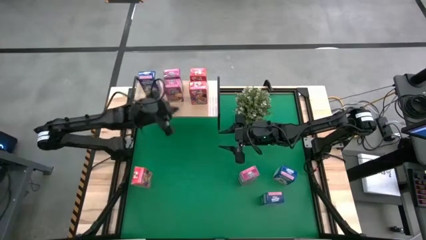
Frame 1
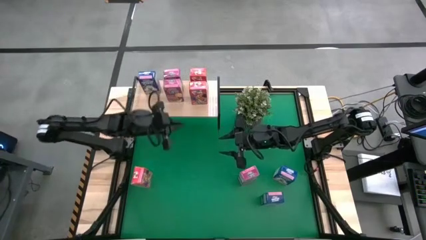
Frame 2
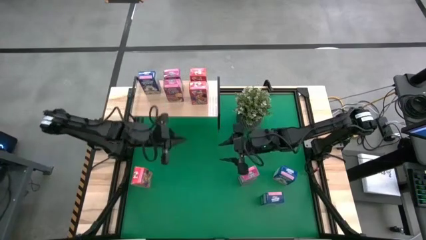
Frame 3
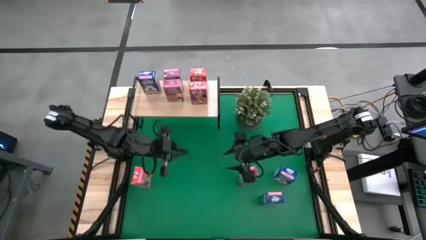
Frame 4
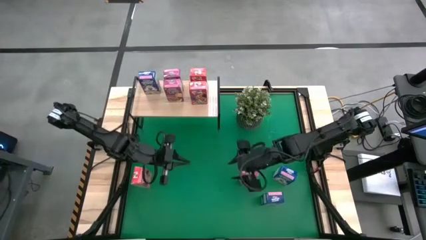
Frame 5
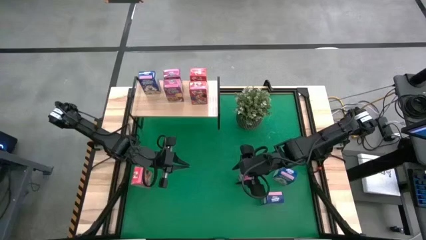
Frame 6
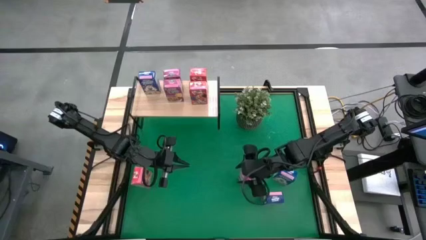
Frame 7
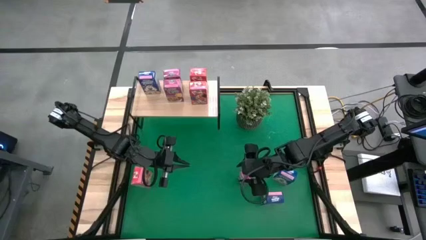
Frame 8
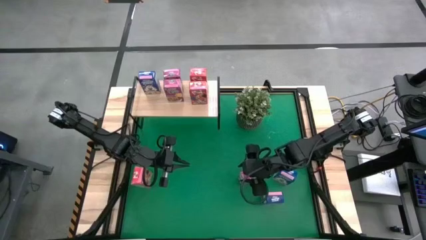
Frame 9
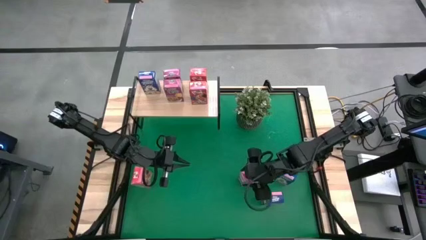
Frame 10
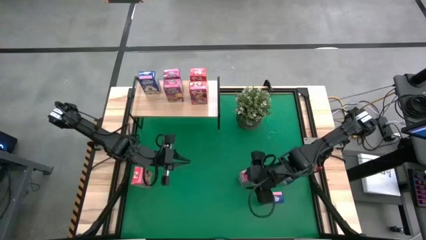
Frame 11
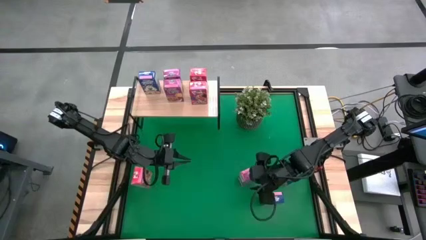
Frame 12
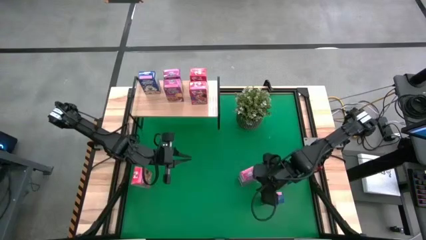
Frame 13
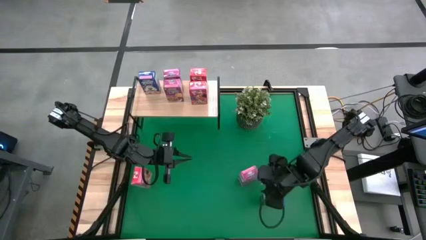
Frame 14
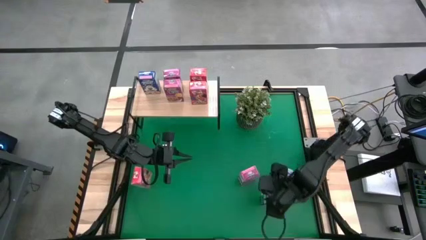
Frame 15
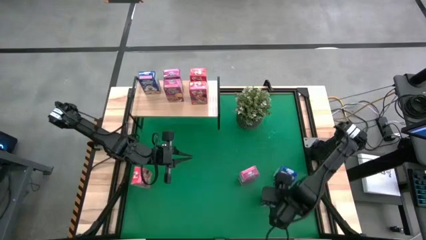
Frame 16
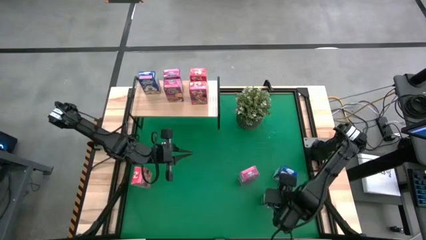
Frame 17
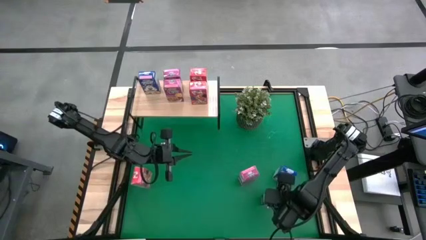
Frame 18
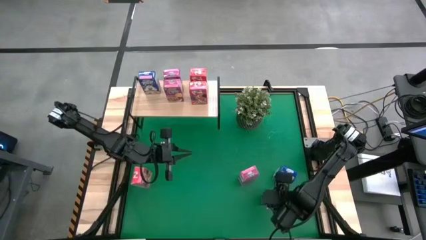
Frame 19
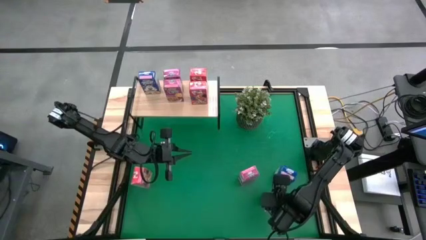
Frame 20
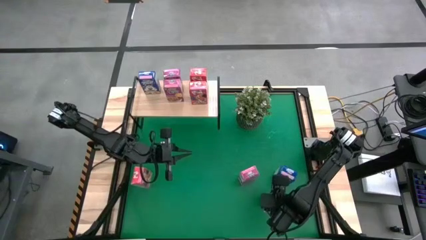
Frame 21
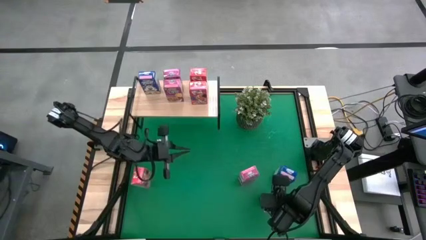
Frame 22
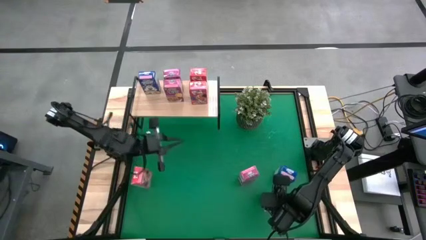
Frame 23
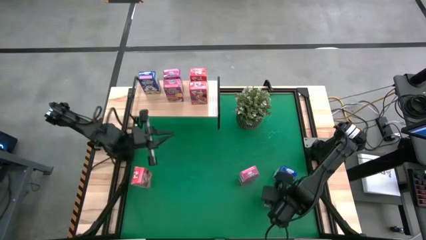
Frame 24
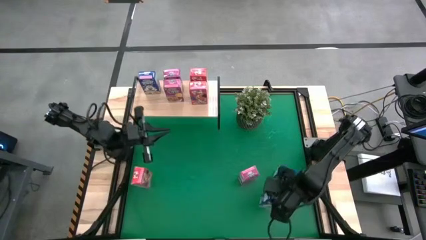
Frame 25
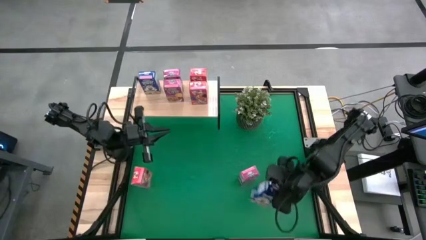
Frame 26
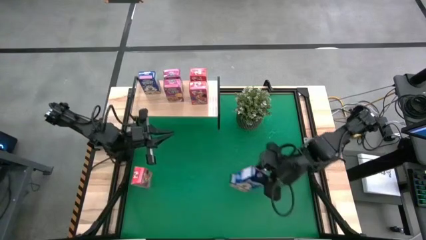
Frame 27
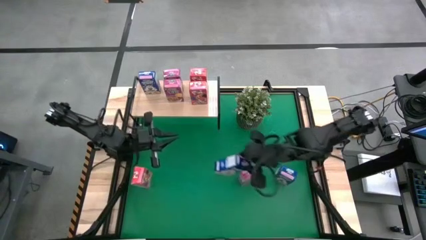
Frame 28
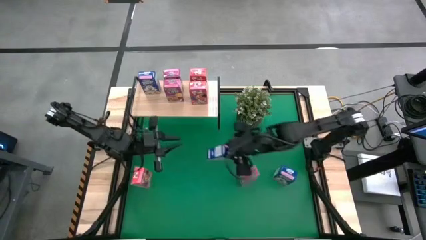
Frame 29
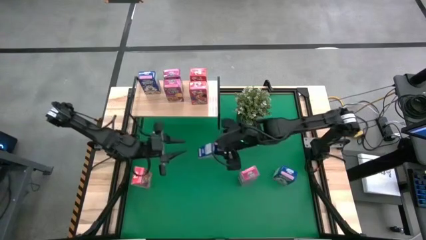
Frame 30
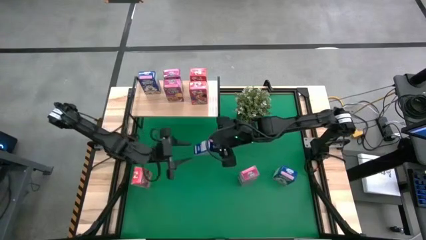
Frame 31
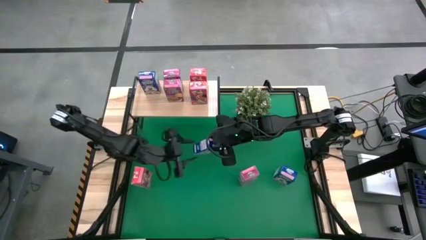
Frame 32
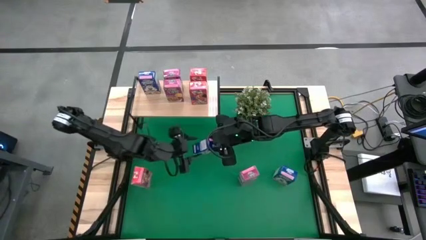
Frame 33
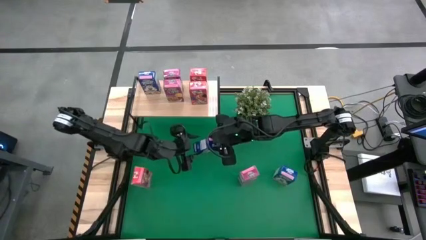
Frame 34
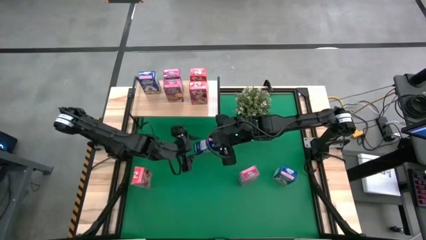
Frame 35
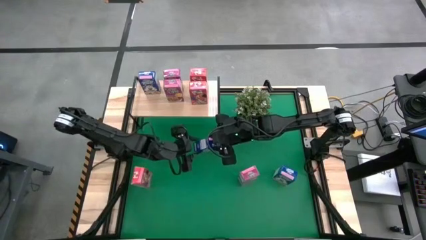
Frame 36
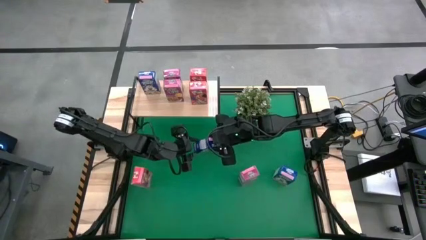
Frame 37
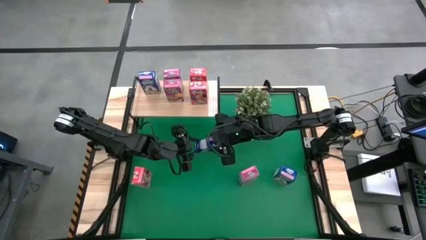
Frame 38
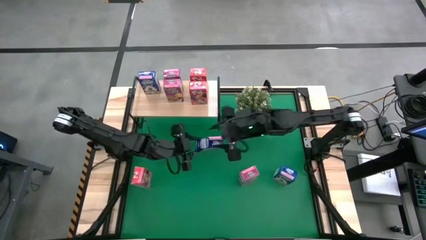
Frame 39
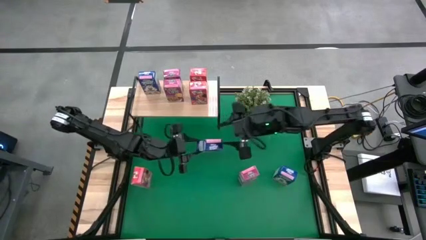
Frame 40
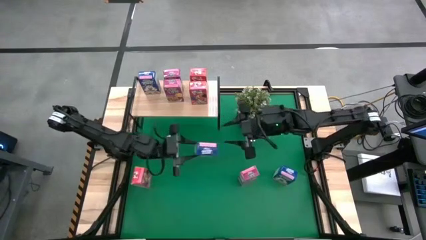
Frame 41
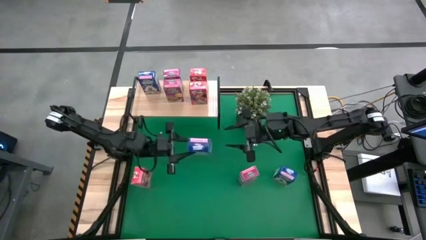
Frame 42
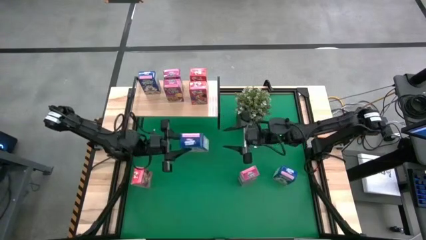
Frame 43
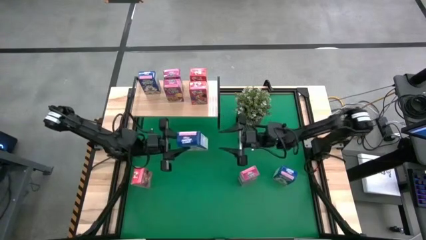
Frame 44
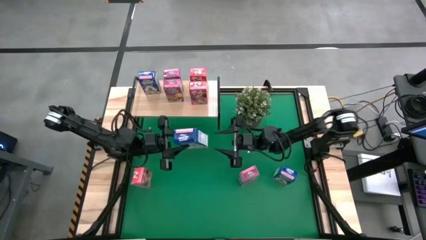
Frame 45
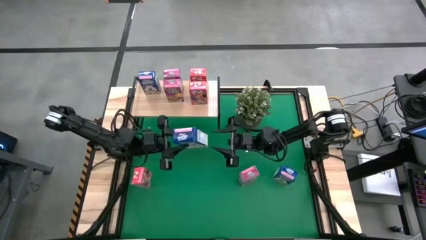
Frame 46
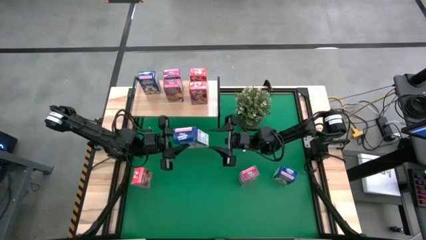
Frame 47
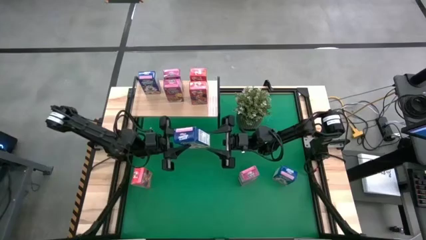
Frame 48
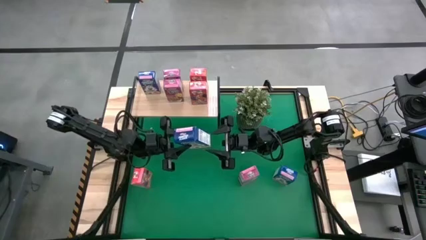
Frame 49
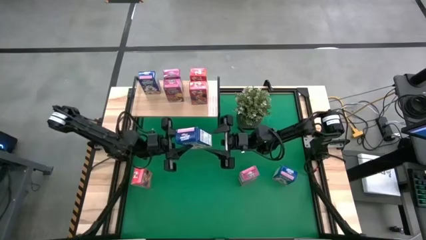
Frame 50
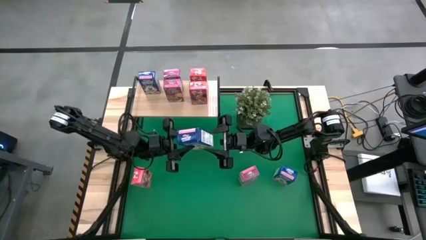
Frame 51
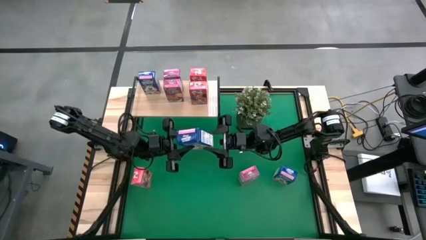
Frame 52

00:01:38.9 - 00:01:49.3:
Task: Stack cereal on shelf
Put the bottom blue cereal box on the shelf
